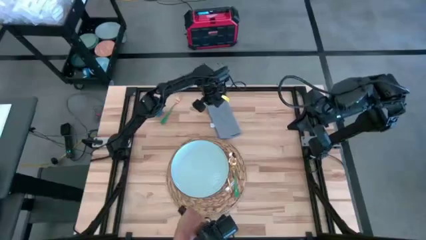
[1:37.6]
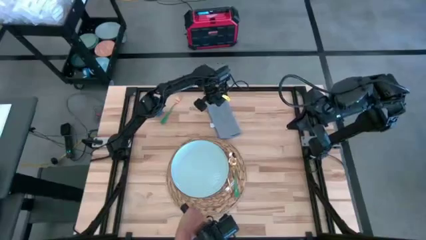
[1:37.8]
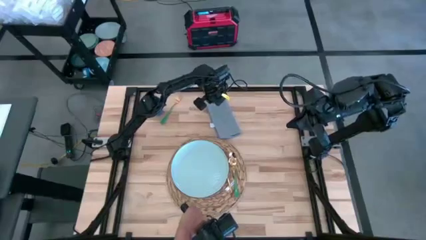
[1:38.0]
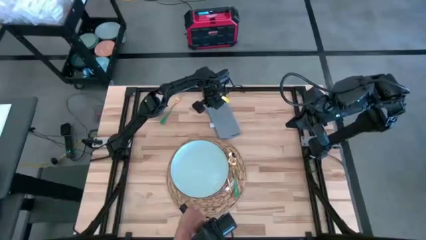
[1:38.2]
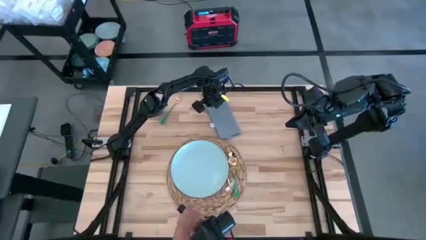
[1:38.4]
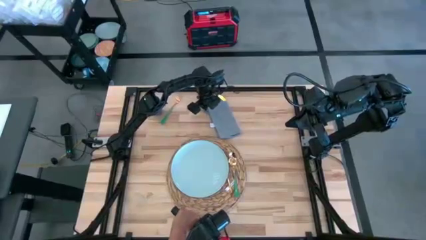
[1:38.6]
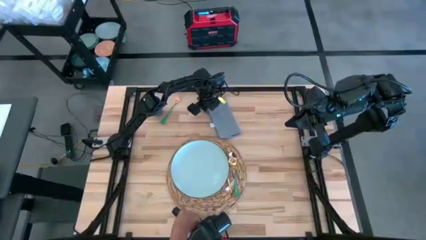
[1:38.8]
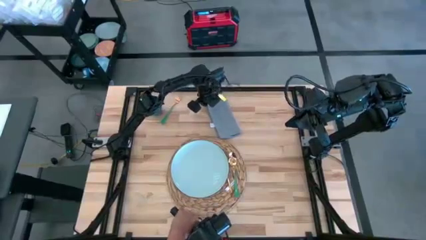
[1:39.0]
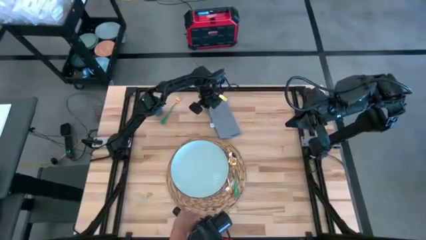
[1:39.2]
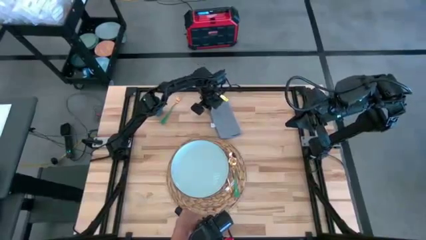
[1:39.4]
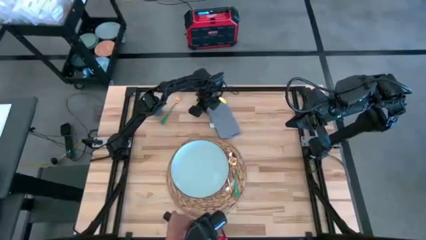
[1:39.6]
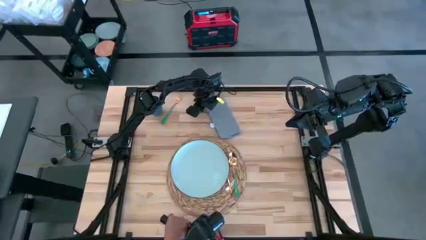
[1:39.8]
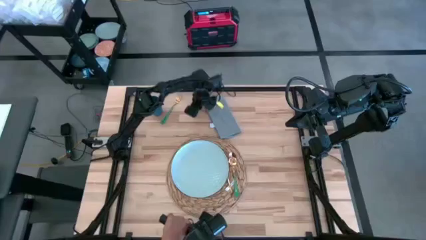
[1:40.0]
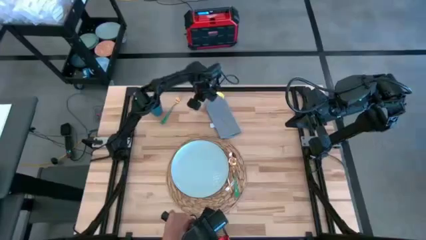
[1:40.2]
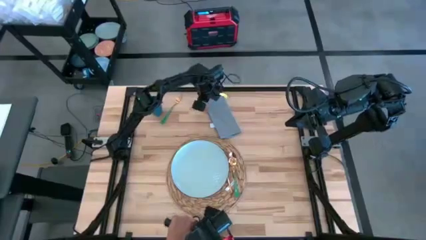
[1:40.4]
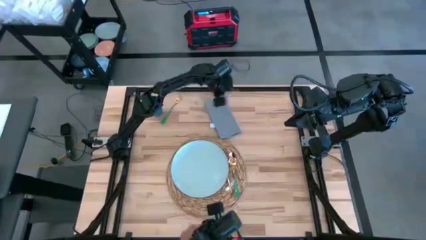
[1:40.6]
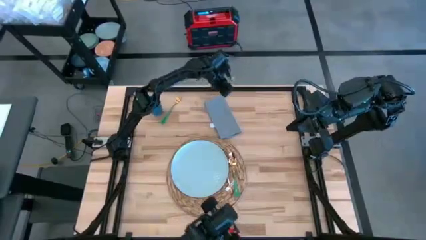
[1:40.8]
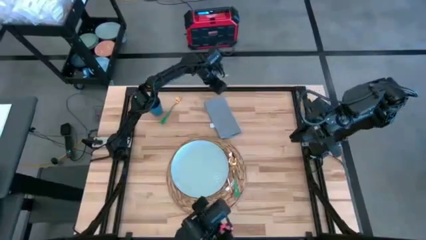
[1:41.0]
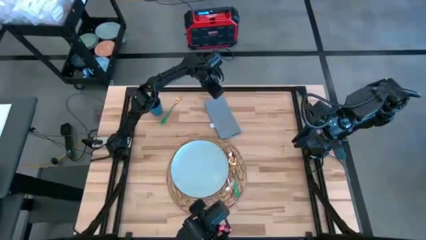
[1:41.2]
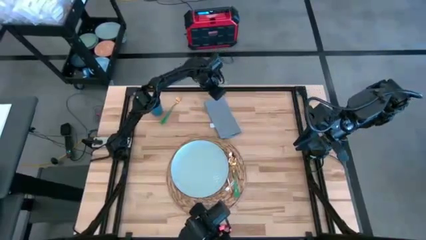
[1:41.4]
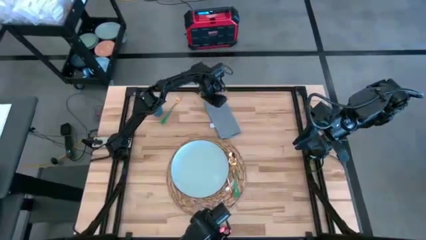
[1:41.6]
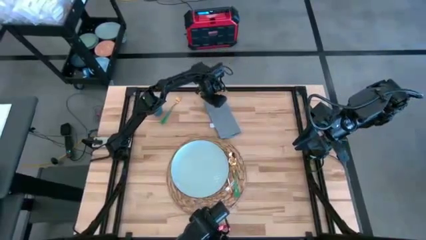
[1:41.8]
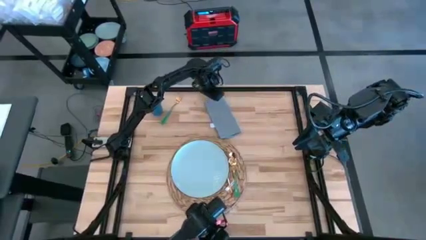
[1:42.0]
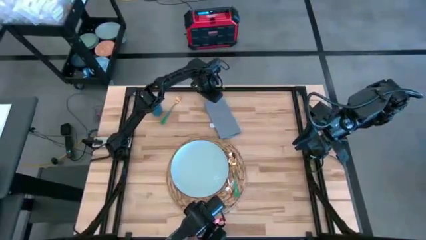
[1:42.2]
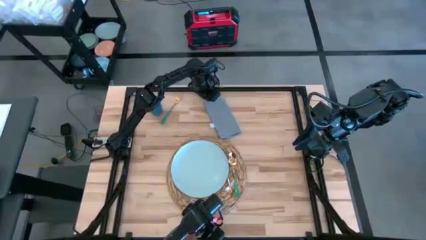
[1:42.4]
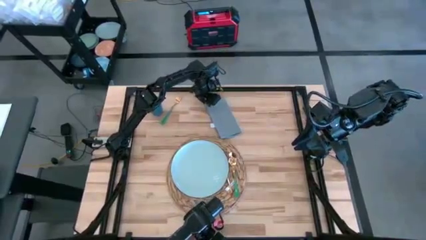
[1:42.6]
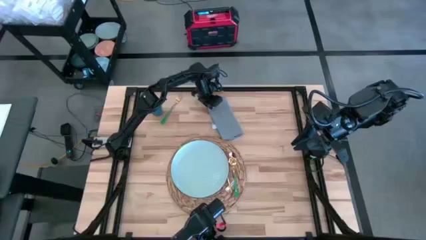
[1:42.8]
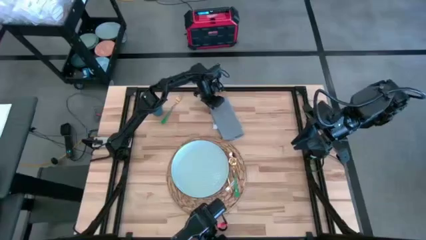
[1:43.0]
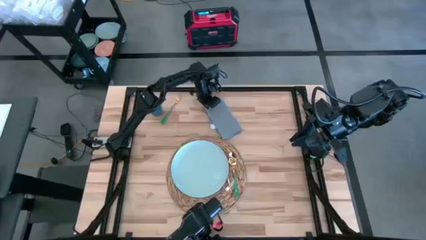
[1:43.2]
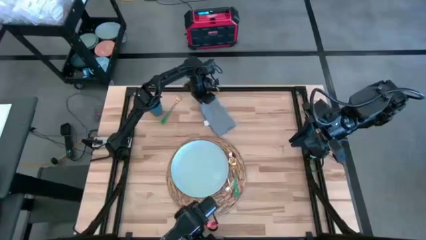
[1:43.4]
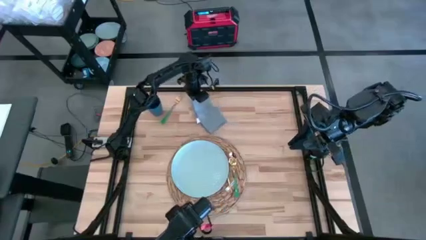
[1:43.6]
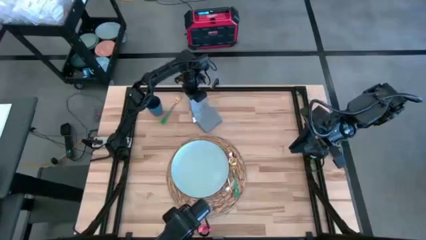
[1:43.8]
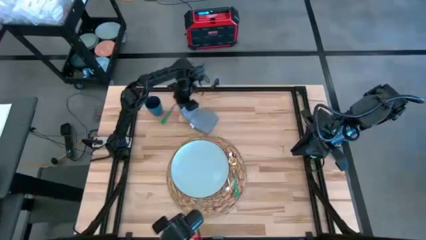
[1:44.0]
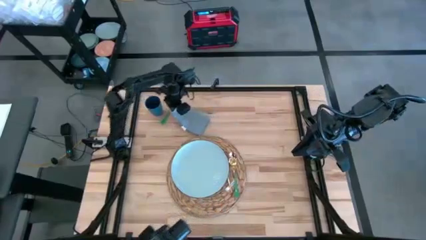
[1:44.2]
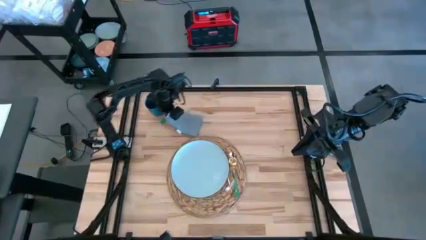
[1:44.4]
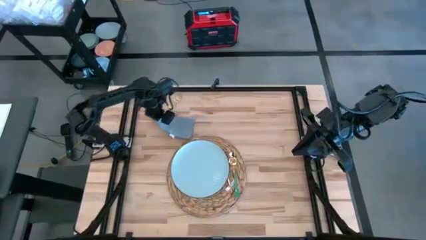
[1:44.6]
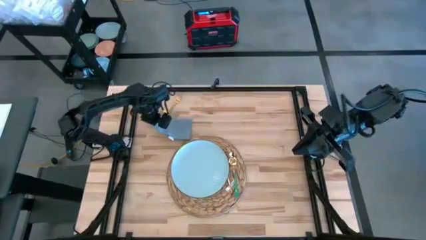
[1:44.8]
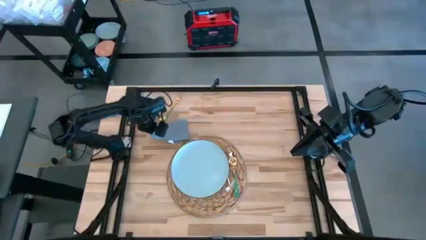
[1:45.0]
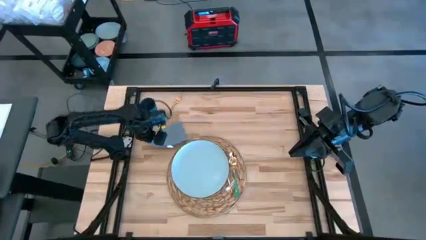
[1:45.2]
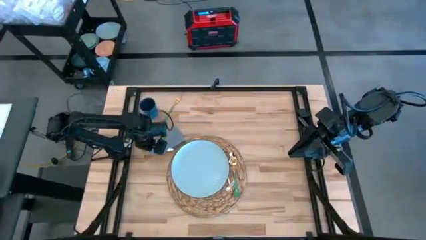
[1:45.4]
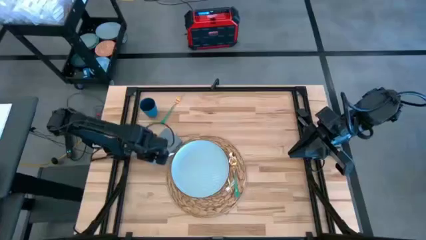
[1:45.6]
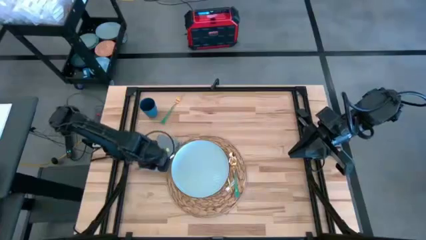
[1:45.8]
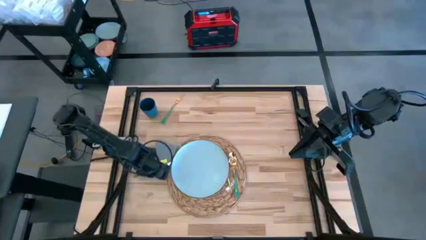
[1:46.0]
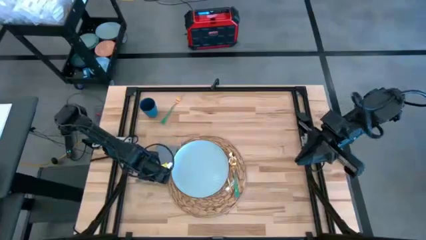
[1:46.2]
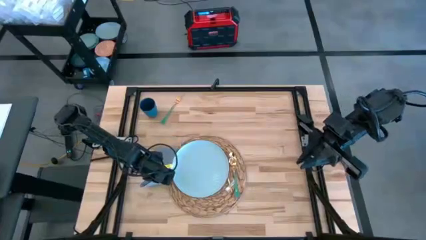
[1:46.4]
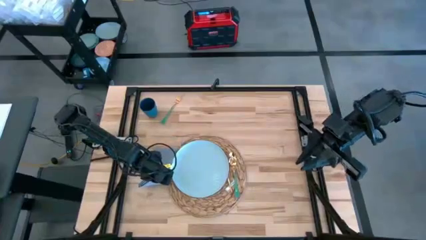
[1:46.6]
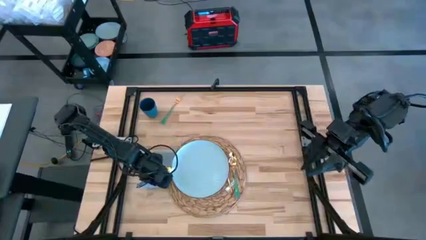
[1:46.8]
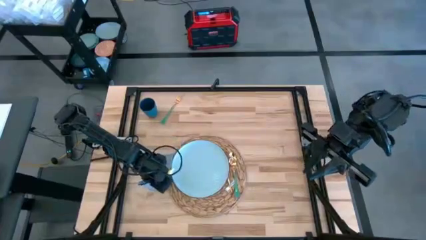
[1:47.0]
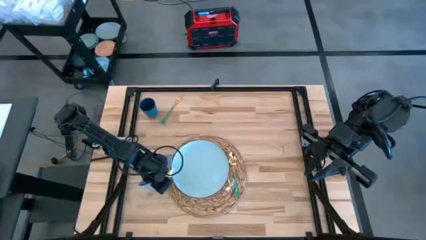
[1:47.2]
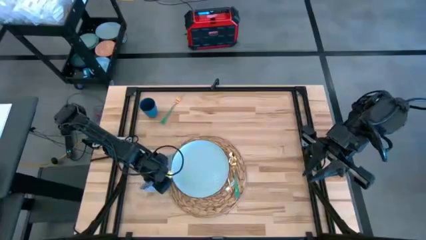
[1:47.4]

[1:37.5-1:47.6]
Task: Set table place
Move the gray table napkin to the left of the brown placemat

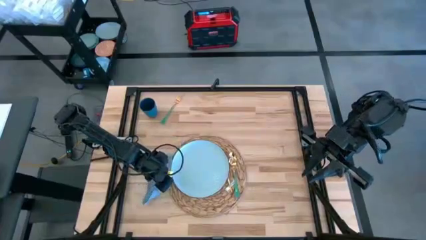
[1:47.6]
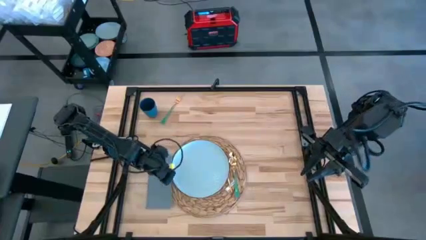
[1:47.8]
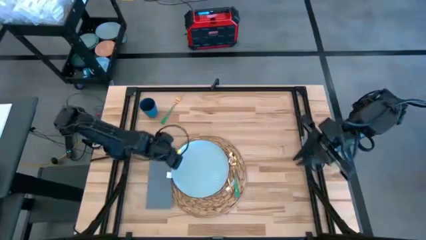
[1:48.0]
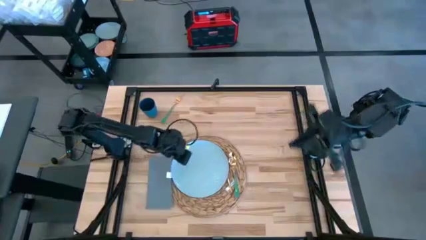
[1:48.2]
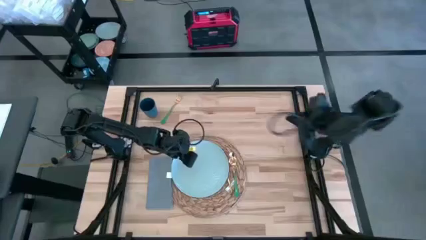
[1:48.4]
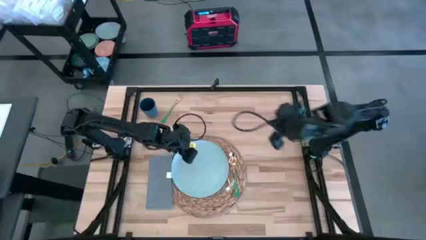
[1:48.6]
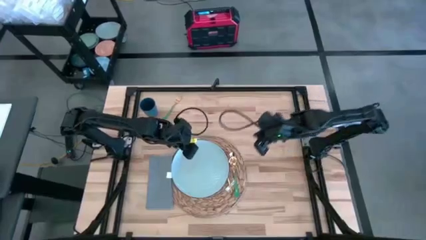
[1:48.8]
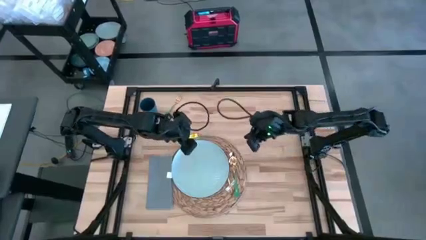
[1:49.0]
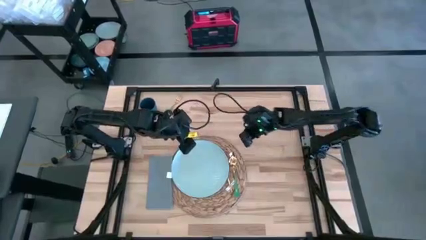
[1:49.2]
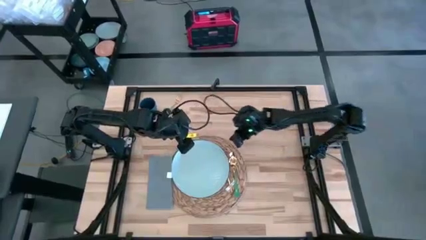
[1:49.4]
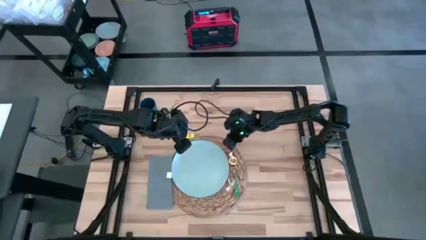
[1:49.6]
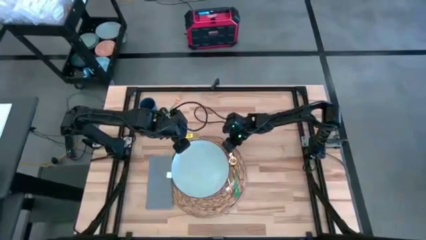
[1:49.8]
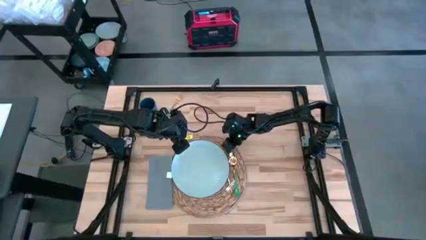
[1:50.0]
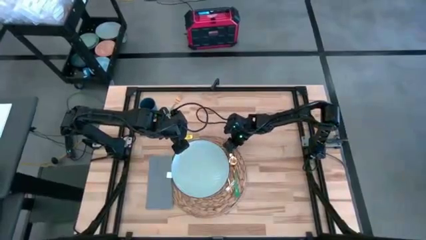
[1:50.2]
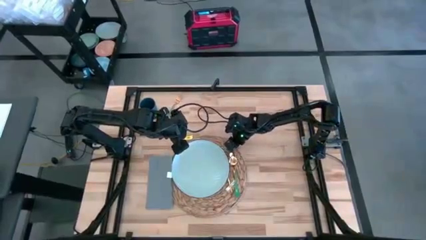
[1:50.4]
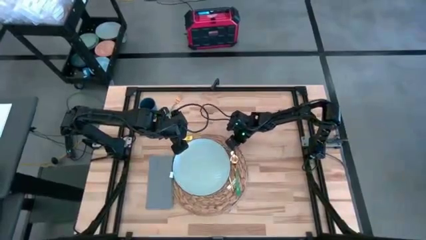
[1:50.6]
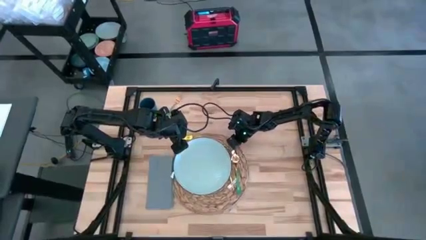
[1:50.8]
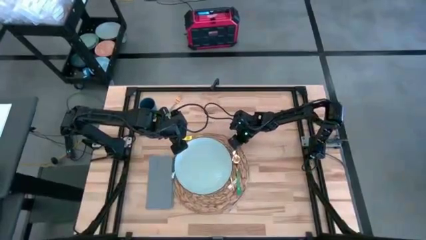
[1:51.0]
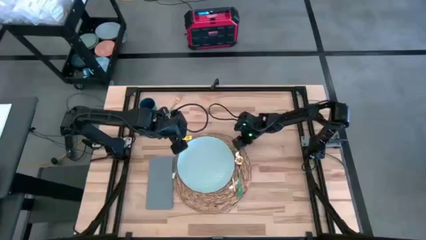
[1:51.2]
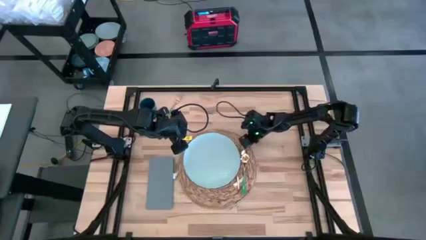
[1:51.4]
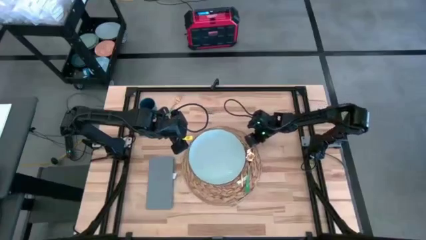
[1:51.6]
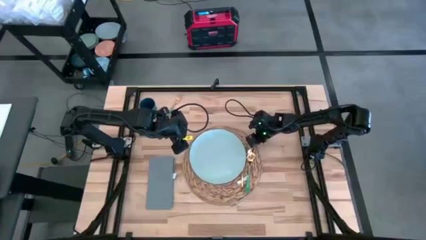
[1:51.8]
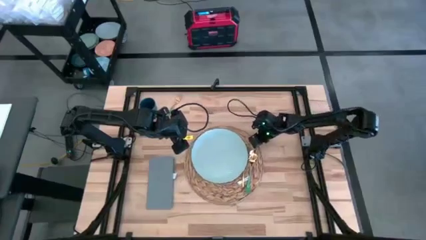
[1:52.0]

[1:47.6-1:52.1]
Adjust the brown placemat

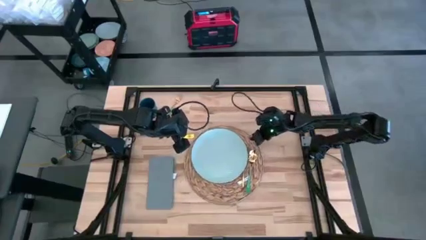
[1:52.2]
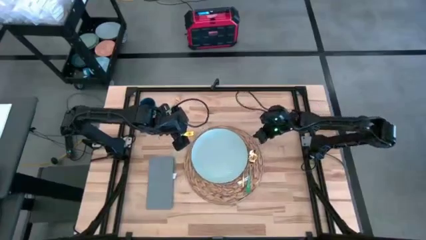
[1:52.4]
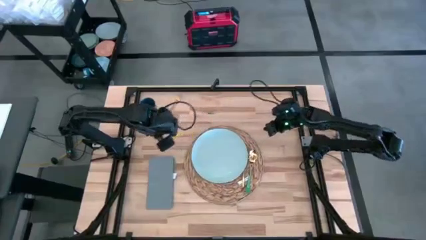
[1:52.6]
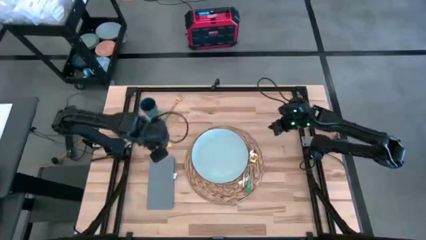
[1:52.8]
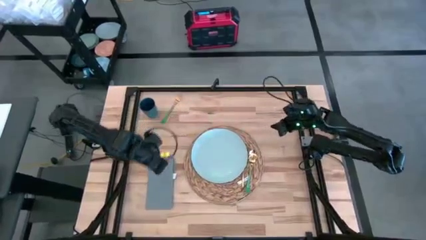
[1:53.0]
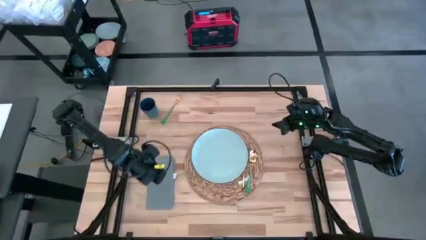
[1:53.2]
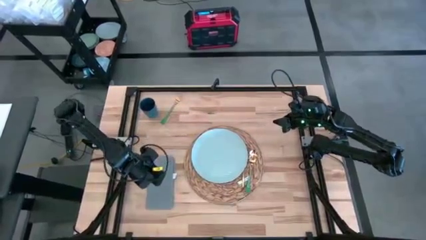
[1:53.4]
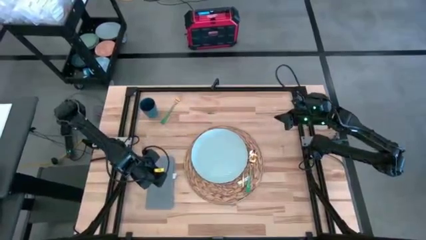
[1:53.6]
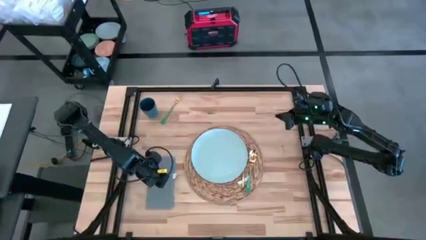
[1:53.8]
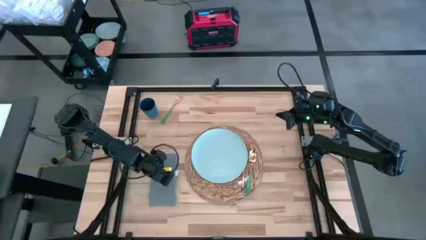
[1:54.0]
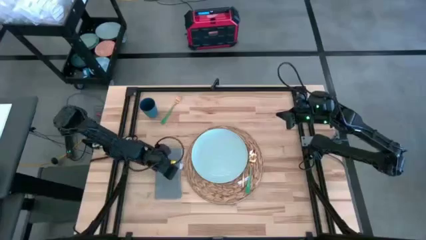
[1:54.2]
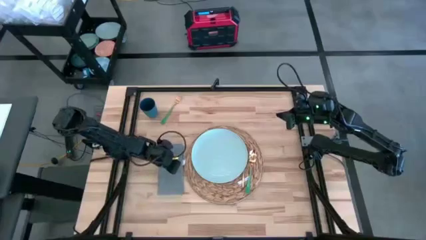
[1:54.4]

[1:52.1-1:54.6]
Adjust the gray table napkin
